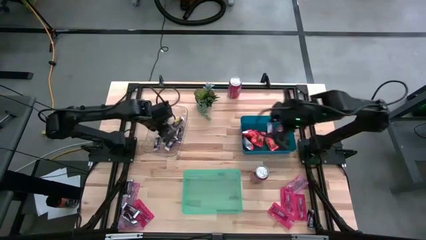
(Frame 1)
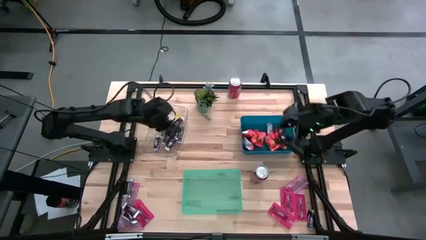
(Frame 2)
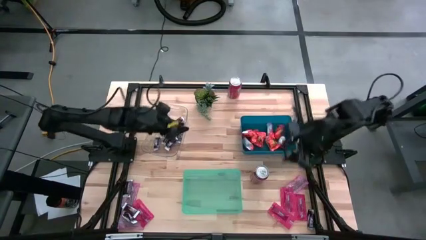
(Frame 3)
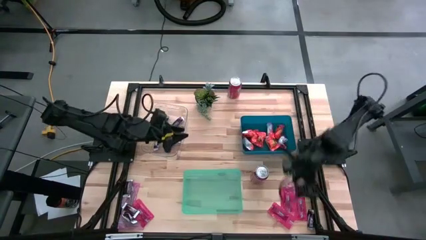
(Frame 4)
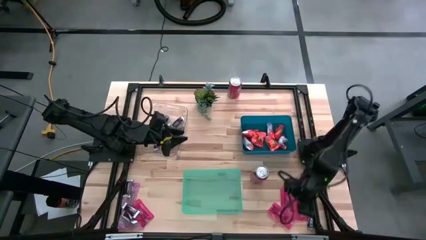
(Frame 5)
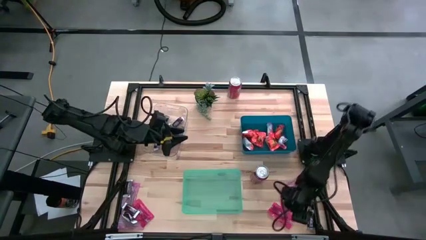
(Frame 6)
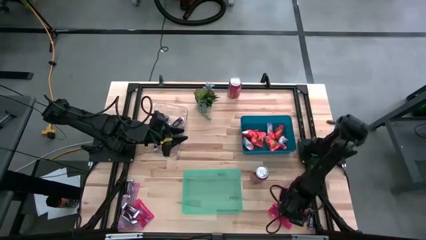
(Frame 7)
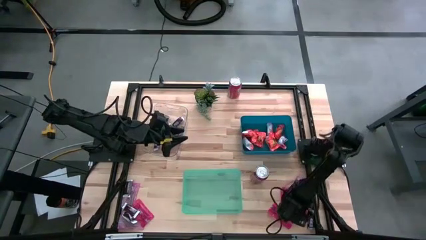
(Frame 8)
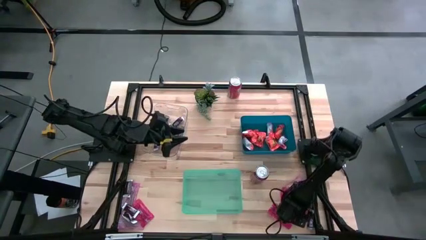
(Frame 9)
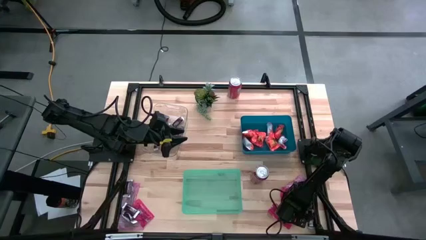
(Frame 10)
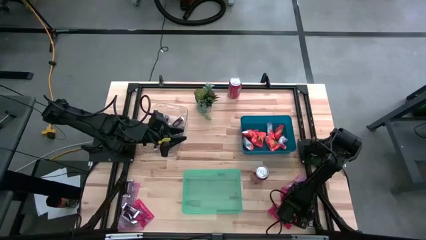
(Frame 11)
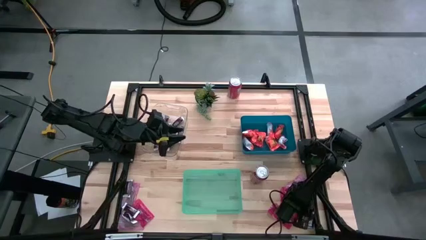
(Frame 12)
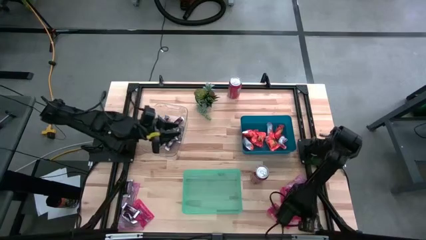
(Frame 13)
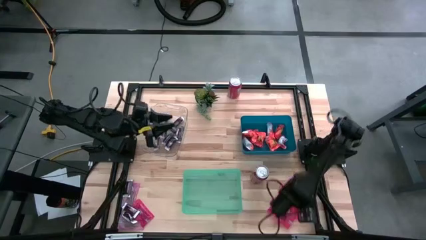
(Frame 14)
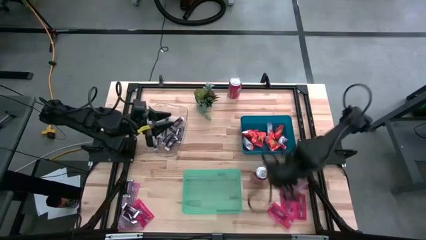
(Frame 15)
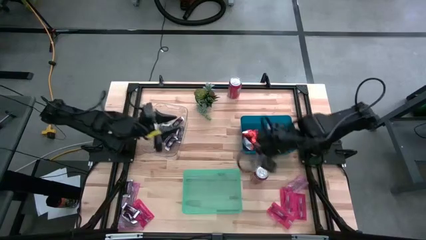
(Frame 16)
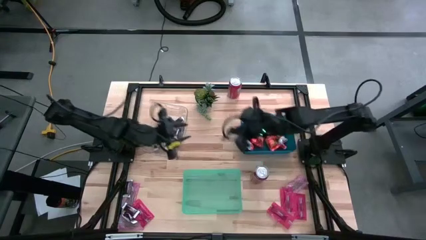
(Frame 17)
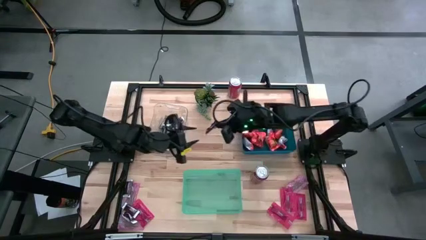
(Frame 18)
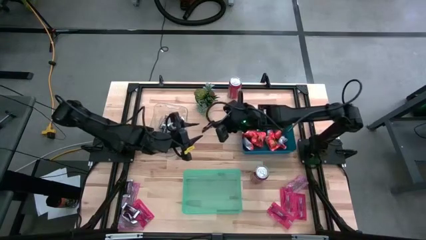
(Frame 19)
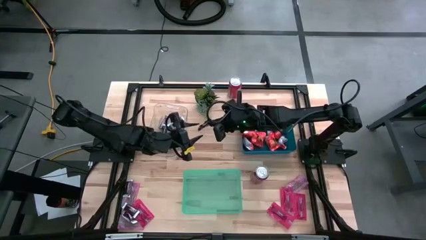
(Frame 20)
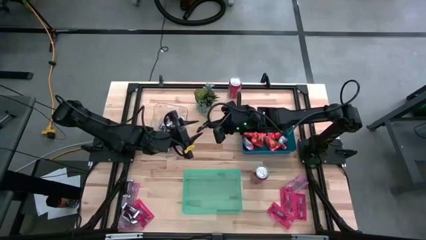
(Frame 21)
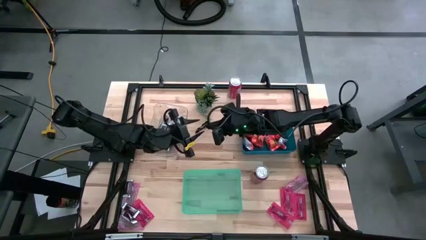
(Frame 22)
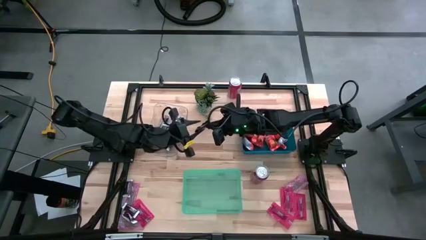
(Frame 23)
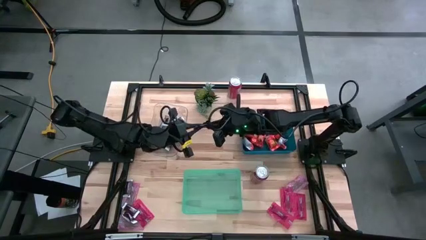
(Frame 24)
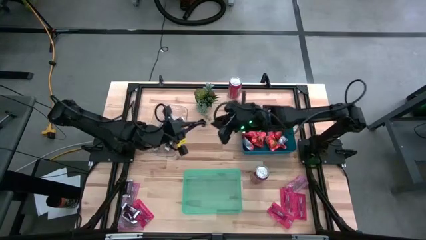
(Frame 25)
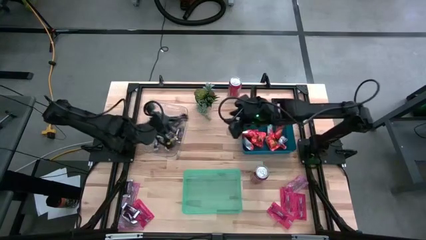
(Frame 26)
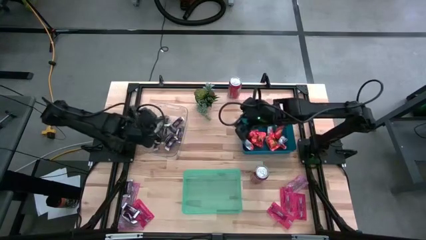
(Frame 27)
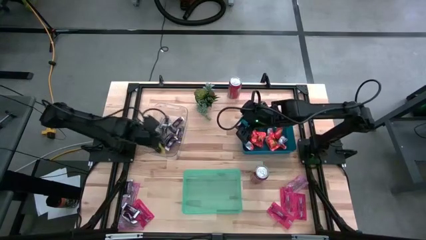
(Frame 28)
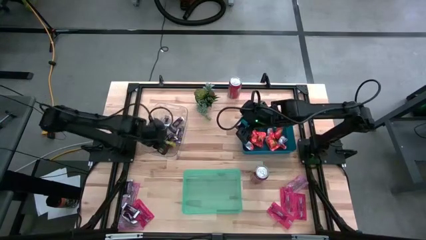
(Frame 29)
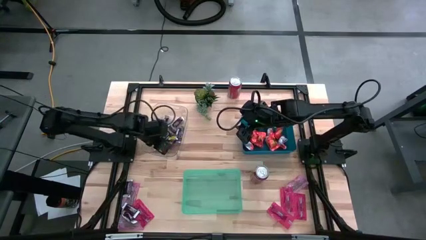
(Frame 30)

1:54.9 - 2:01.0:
Task: Sort candy
Put the brown chocolate bar into the transparent bin

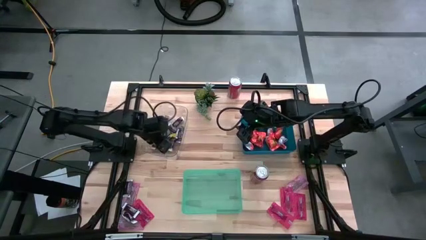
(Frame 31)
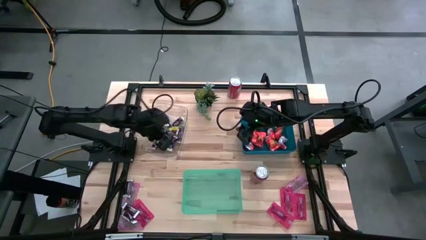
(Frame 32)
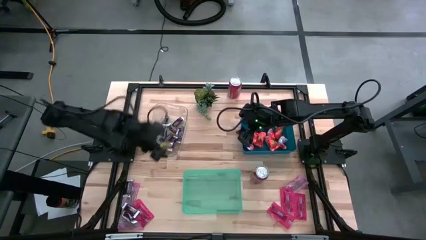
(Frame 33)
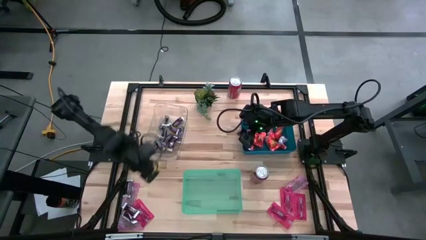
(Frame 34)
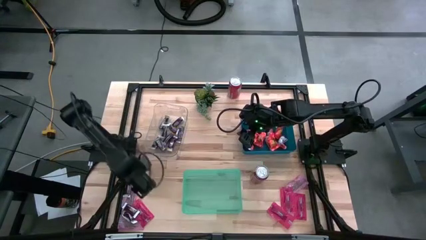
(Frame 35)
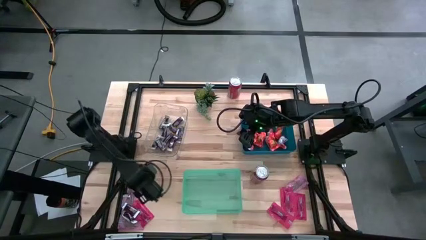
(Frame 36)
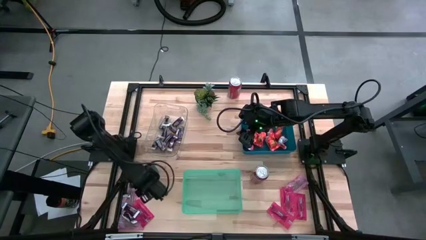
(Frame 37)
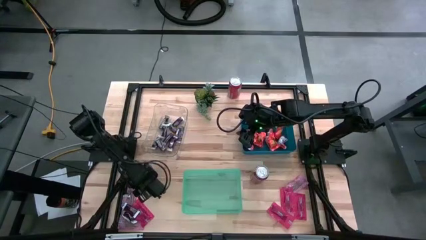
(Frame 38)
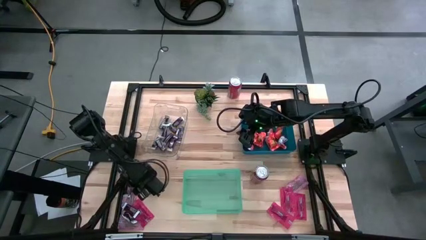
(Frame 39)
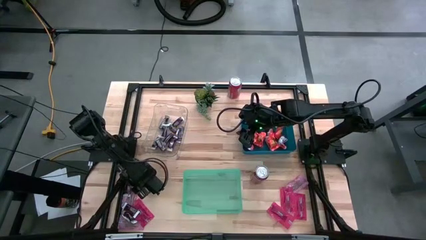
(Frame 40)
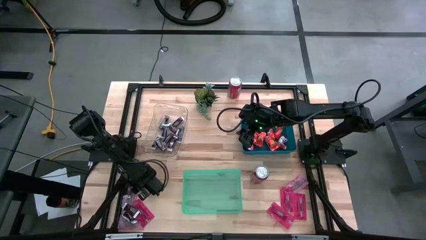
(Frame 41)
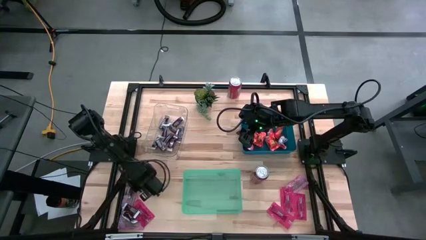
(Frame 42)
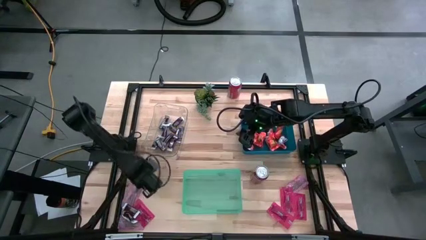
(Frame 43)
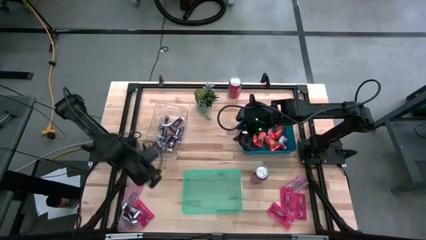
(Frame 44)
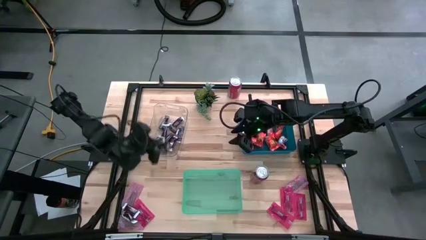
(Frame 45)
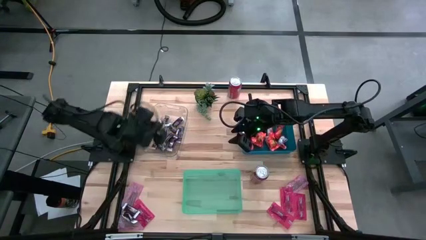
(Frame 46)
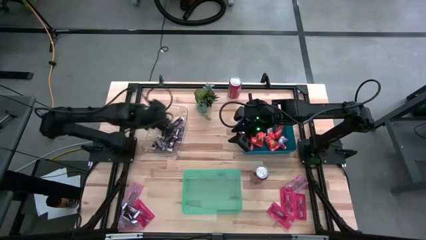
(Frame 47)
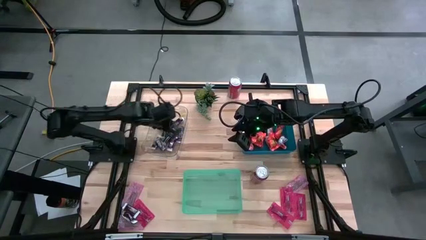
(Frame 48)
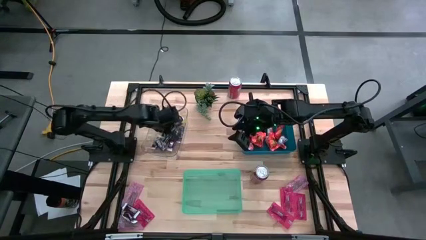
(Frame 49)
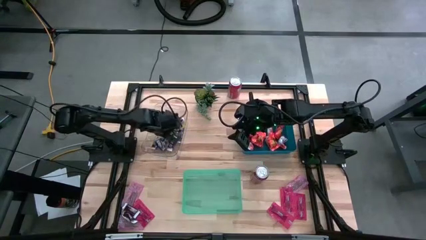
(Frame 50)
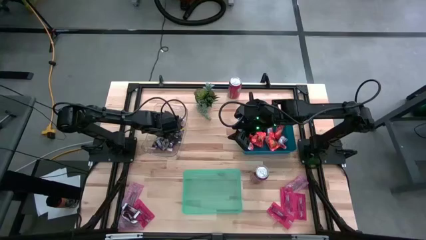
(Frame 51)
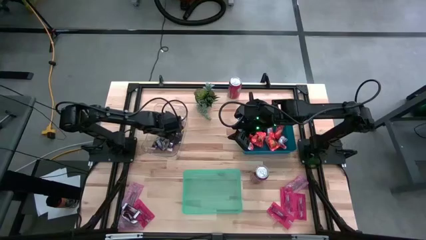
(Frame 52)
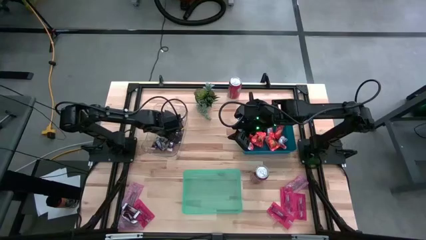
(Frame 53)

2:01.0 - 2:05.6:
Put the brown chocolate bar into the transparent bin

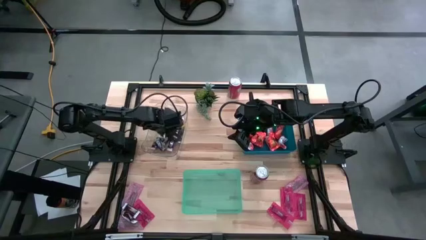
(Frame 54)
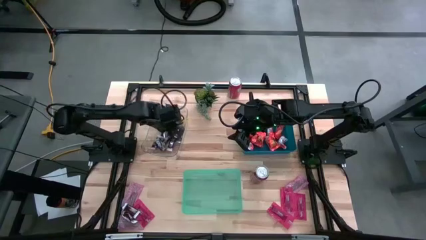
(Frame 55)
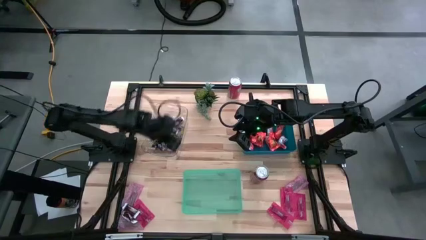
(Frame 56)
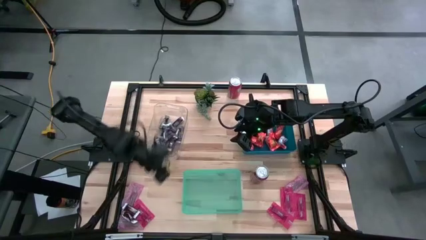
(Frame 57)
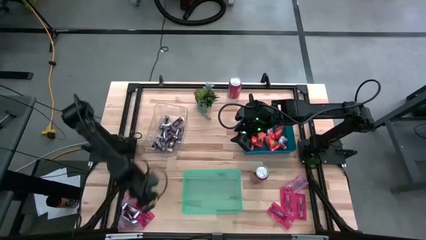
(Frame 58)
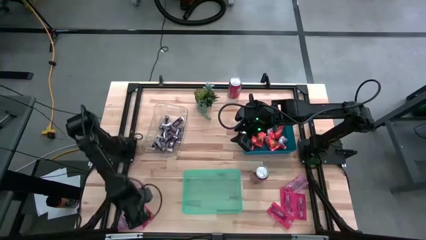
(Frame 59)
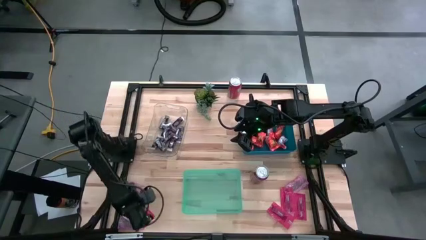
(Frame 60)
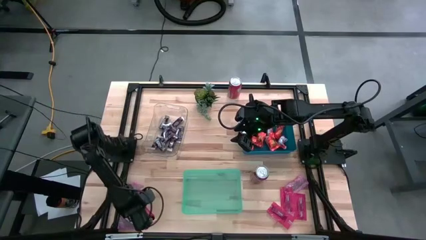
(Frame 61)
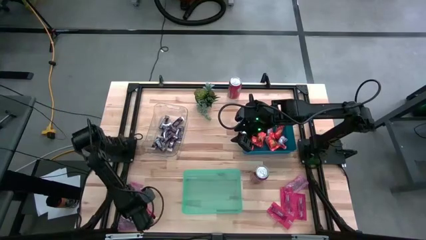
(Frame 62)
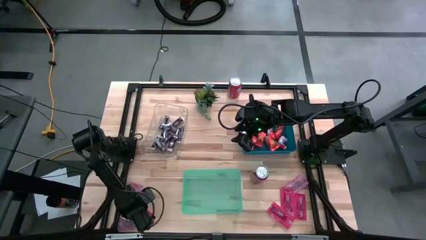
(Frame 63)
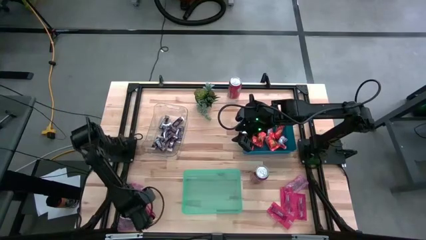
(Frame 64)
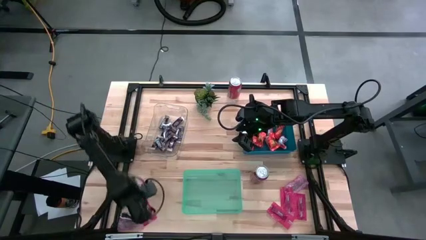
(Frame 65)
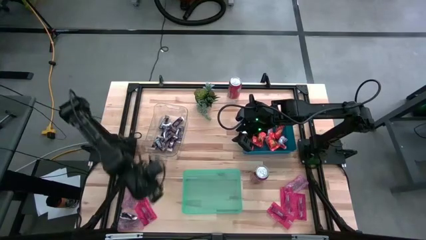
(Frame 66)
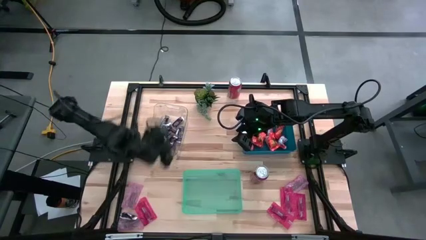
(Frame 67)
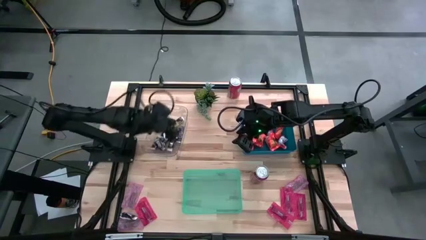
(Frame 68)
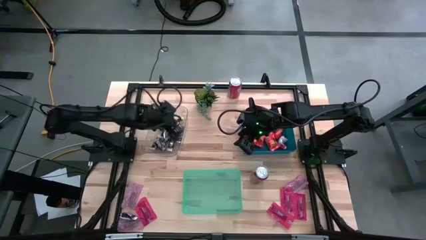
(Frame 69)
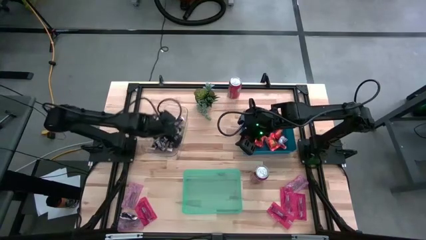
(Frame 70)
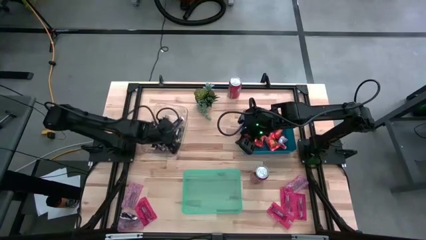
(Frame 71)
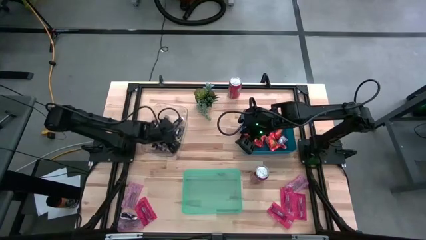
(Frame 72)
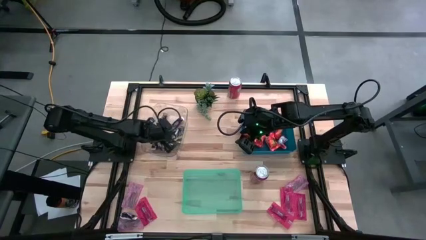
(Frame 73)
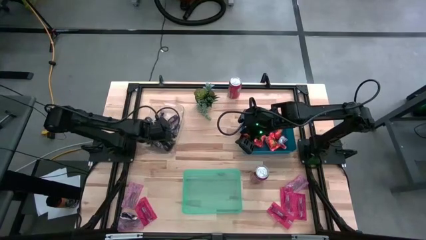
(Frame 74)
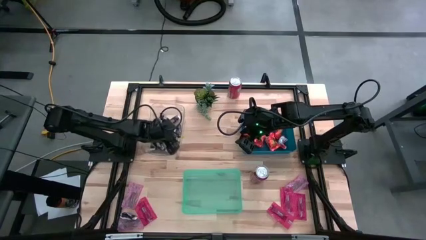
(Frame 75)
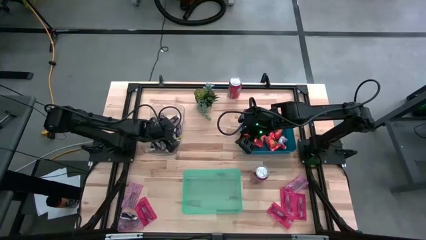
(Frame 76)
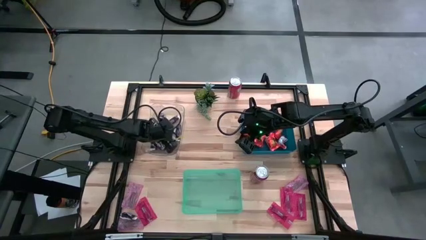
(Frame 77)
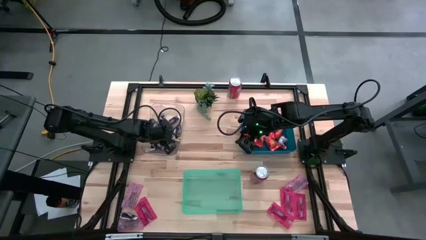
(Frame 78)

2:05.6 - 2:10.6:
Put the brown chocolate bar into the transparent bin
